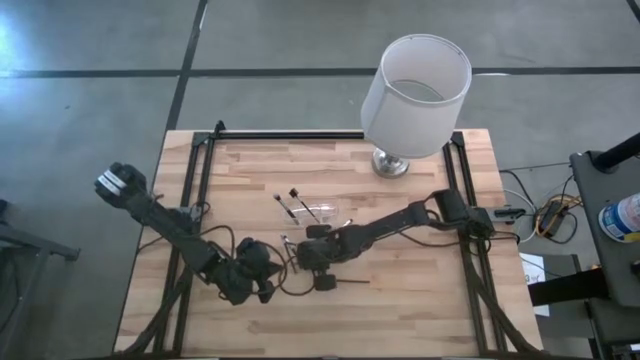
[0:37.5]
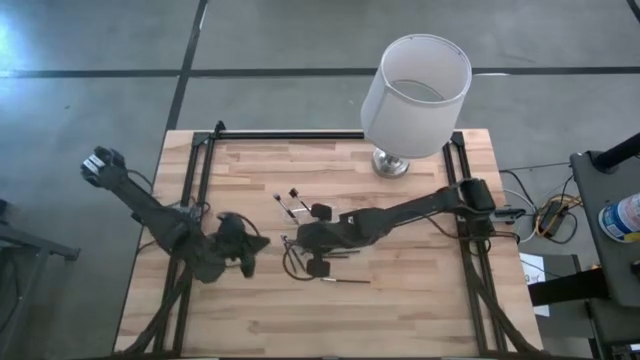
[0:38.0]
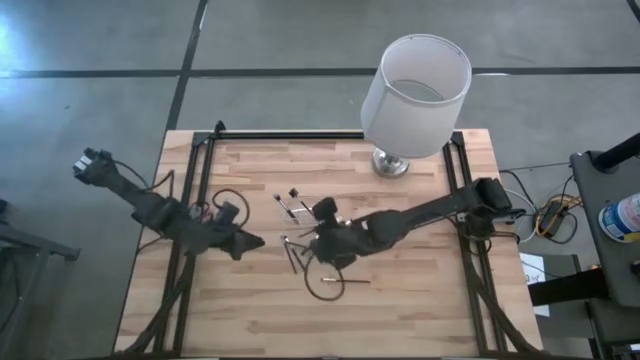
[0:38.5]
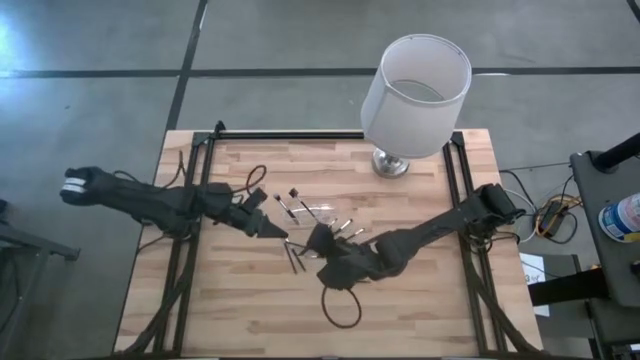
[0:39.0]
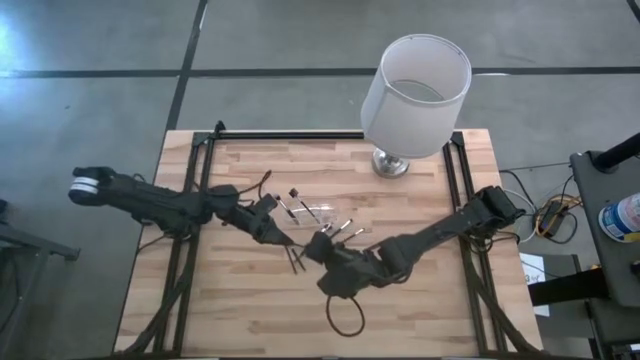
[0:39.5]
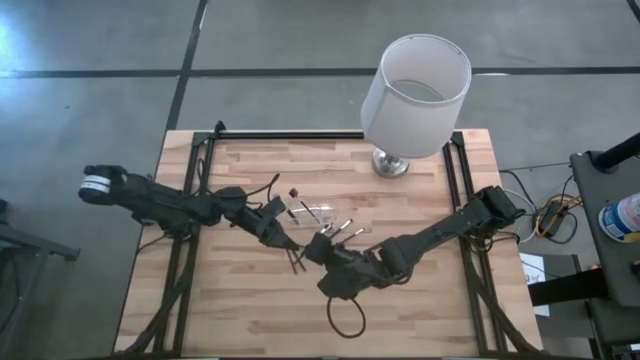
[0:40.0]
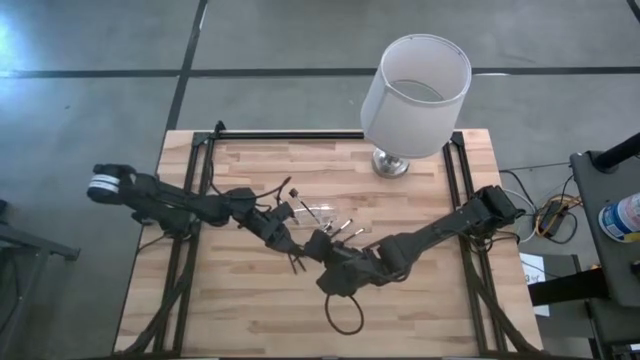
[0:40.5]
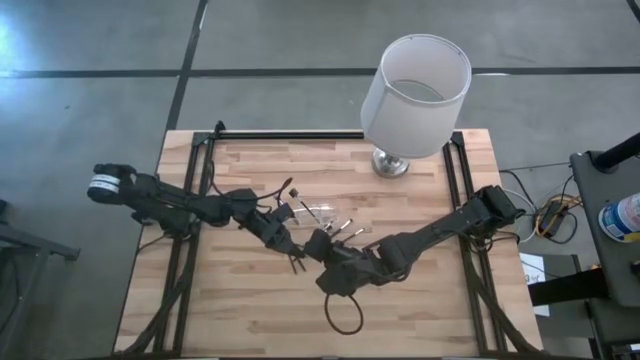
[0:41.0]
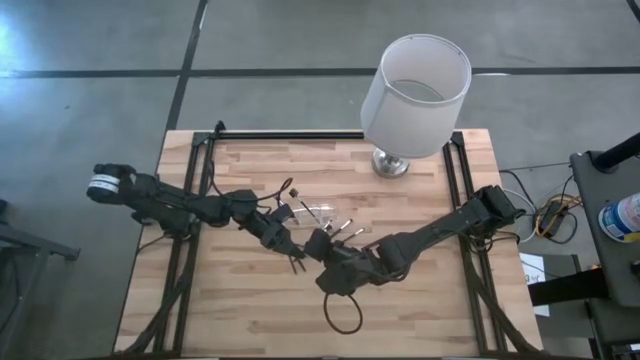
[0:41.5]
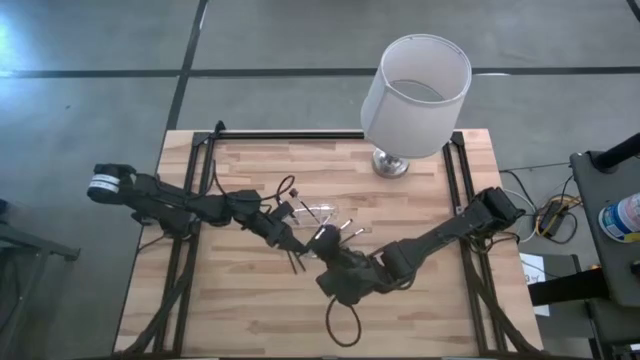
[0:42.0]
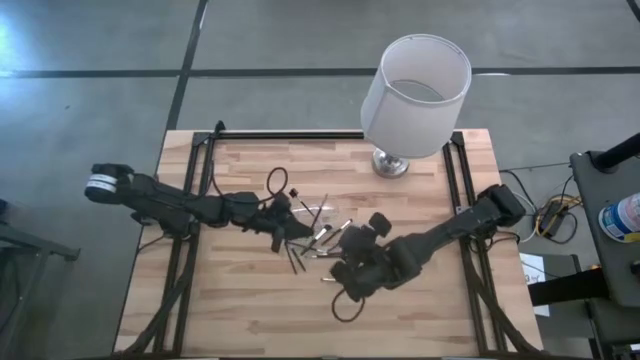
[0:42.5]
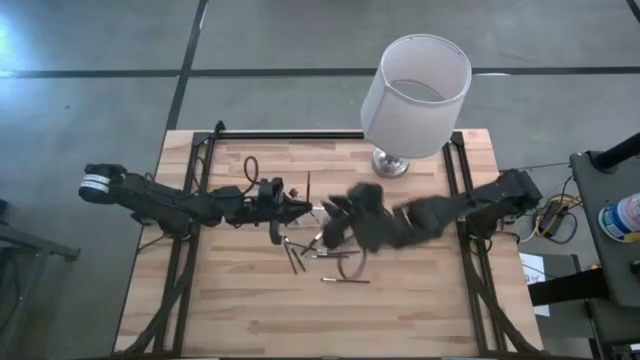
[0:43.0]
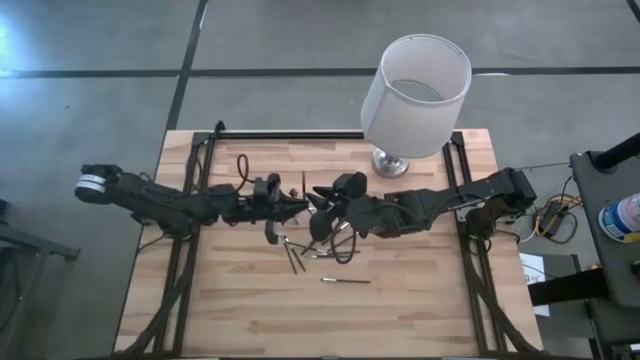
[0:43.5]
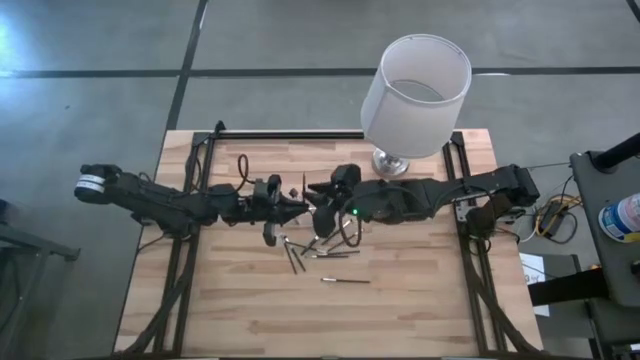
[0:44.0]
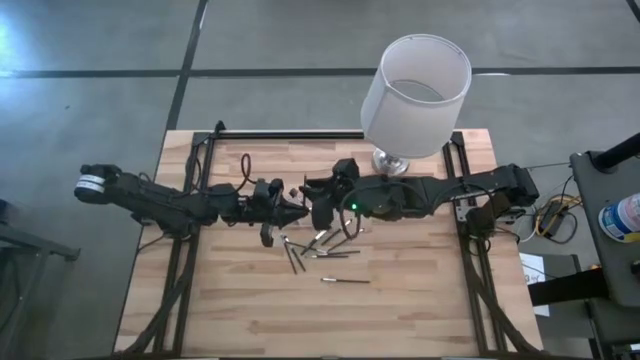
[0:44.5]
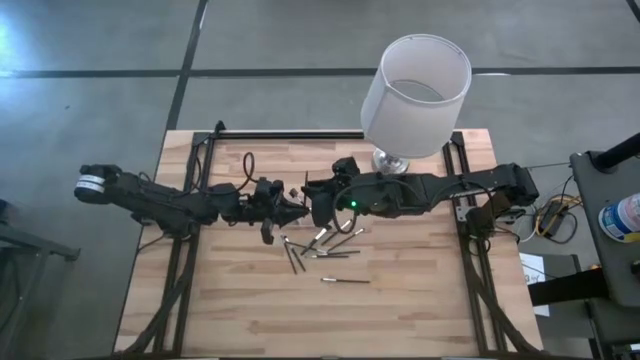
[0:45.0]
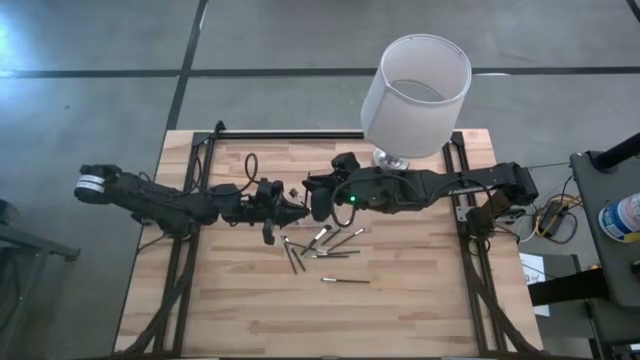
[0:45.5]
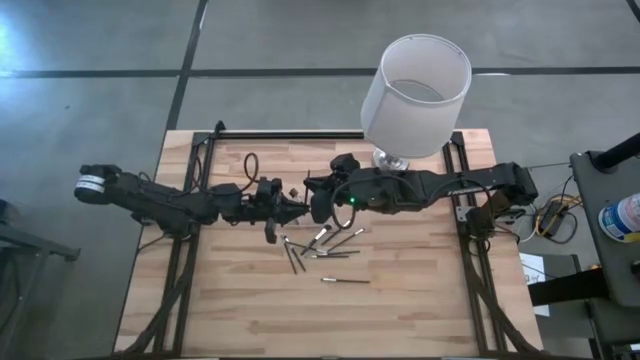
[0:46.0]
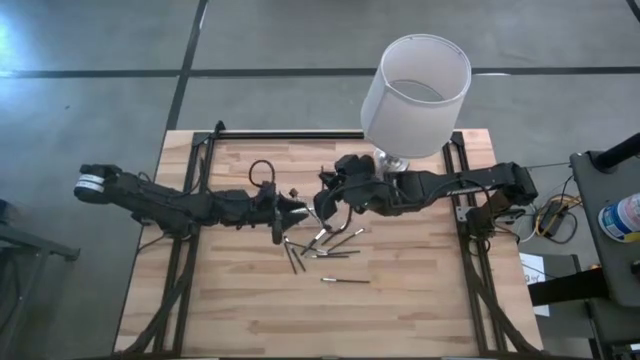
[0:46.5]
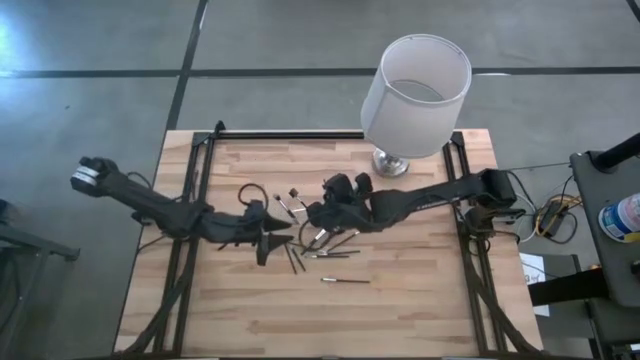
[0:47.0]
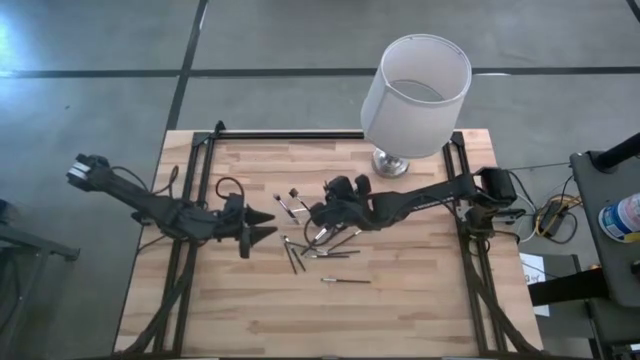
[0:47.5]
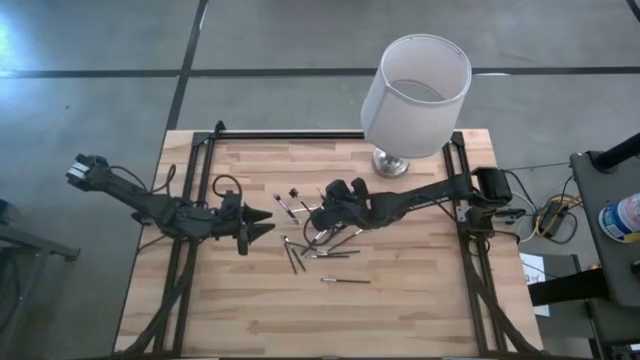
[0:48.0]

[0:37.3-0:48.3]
Task: Put items in baskets/containers
Put the eyeshadow brush into the transparent organizer

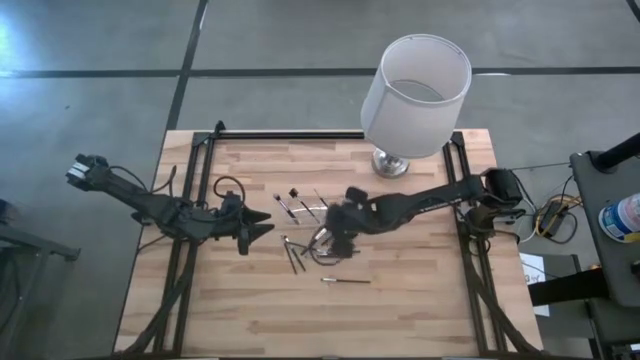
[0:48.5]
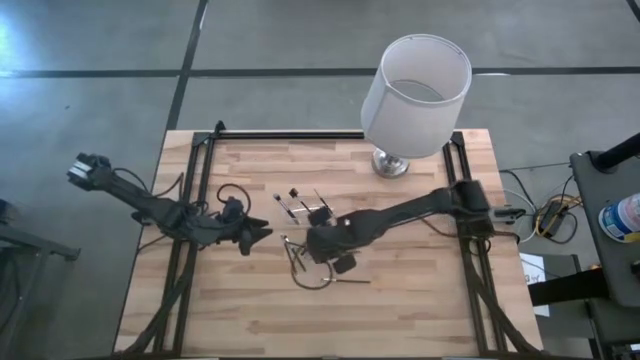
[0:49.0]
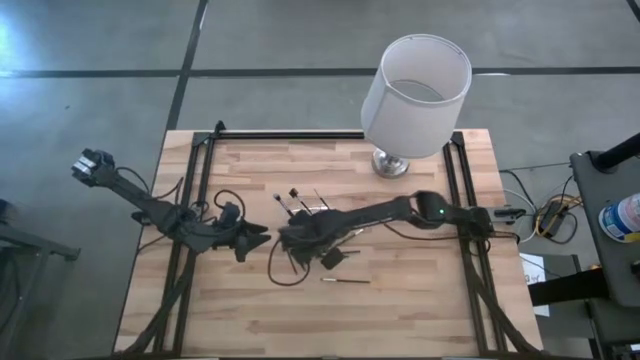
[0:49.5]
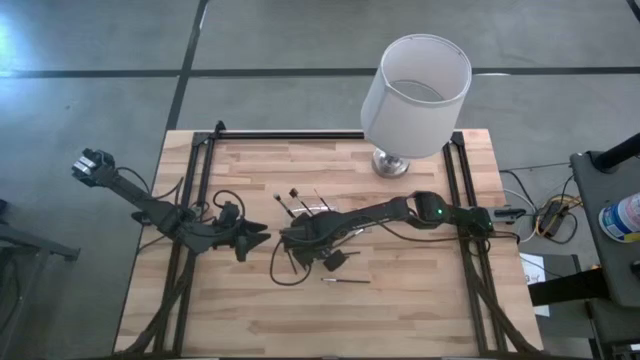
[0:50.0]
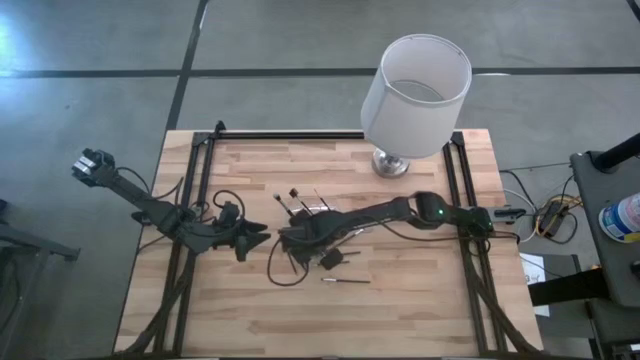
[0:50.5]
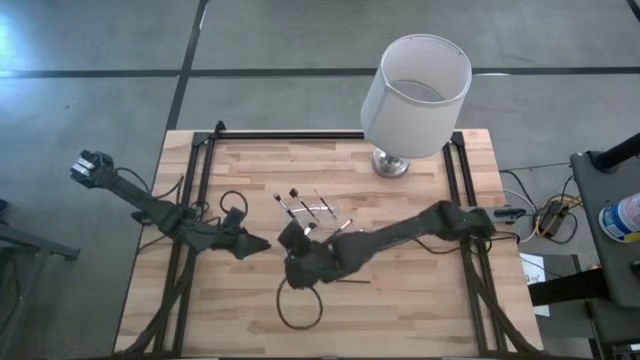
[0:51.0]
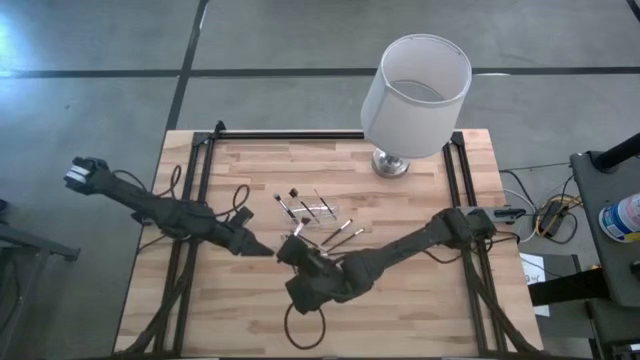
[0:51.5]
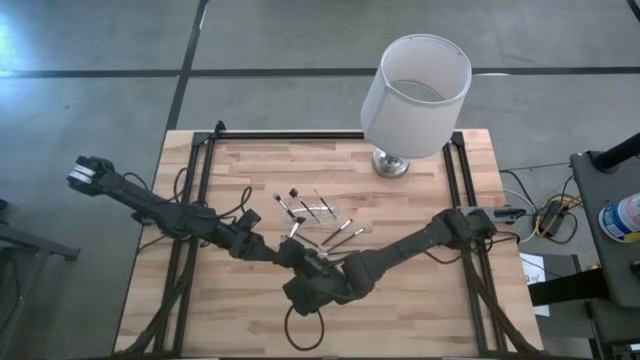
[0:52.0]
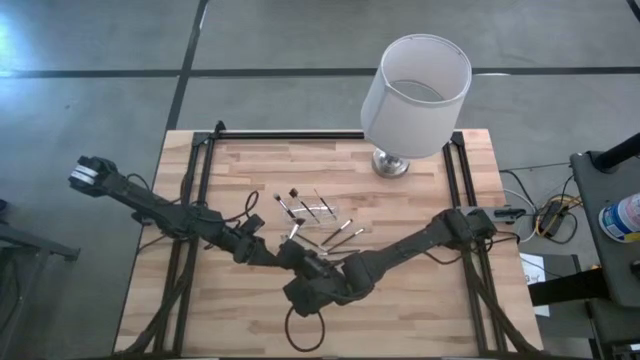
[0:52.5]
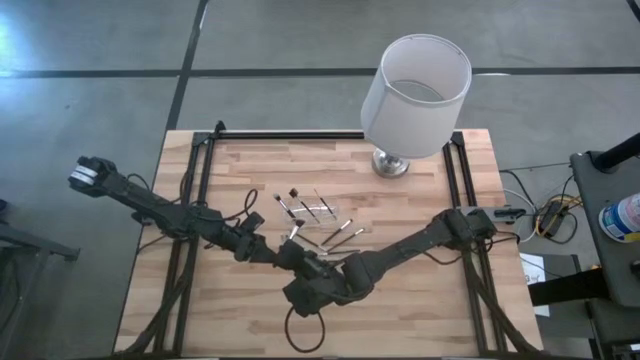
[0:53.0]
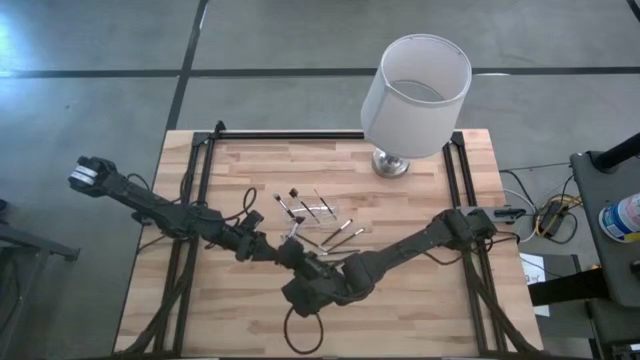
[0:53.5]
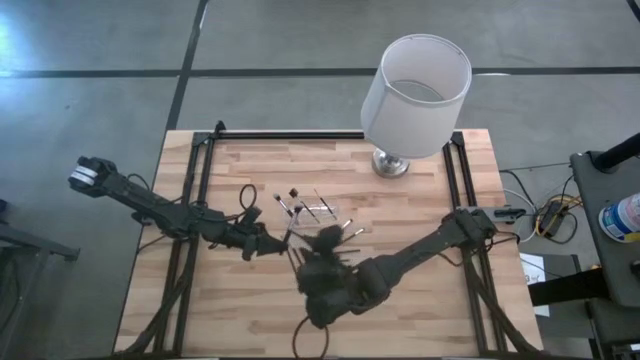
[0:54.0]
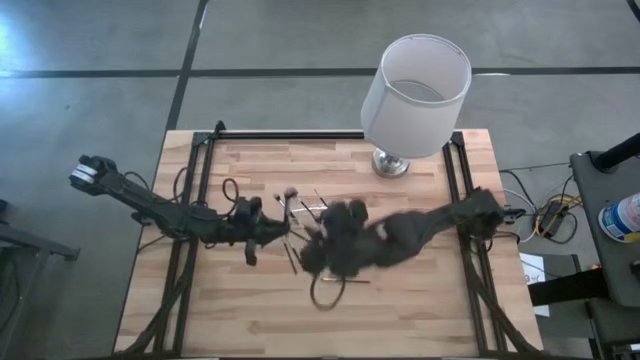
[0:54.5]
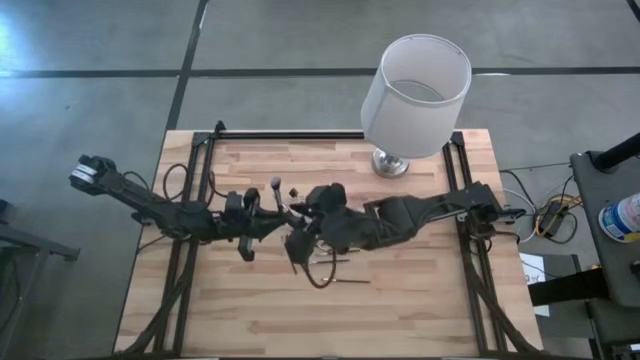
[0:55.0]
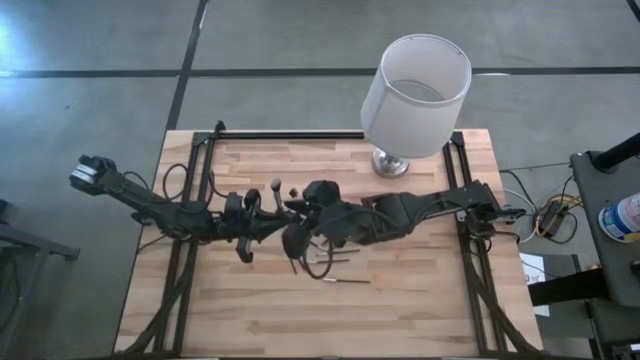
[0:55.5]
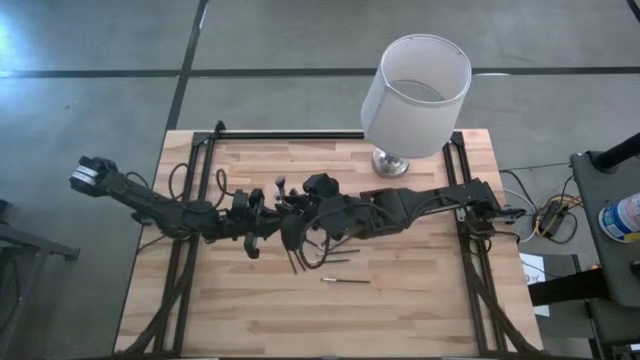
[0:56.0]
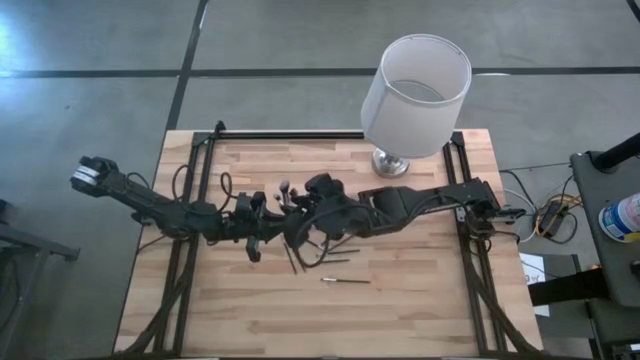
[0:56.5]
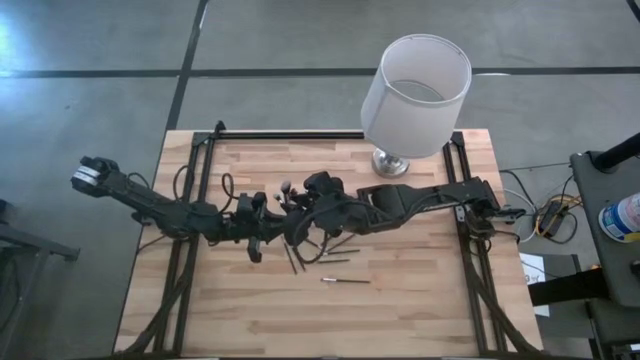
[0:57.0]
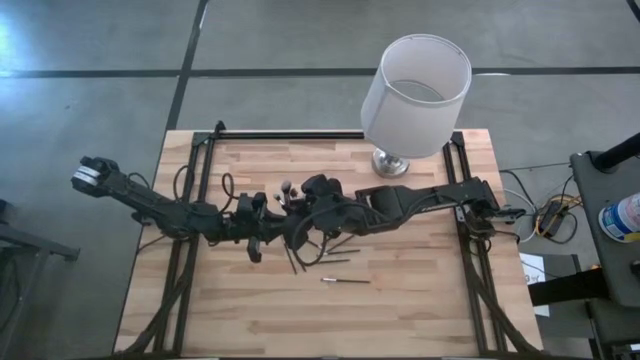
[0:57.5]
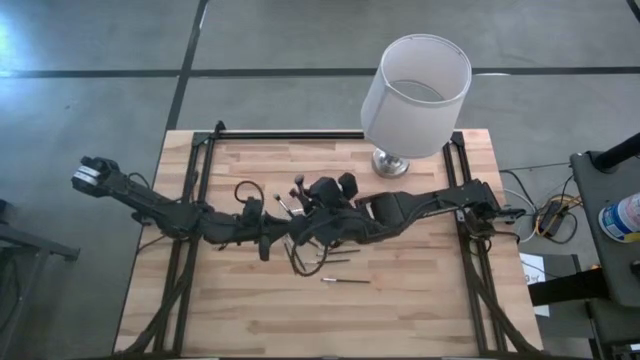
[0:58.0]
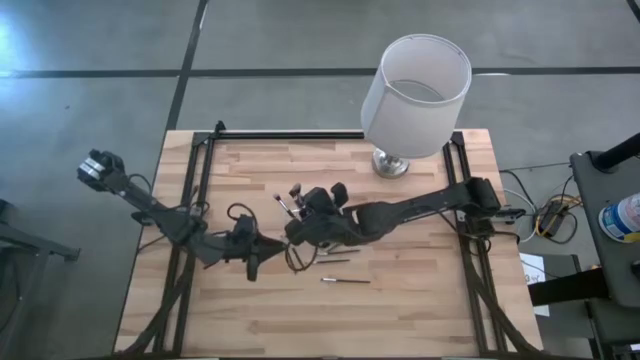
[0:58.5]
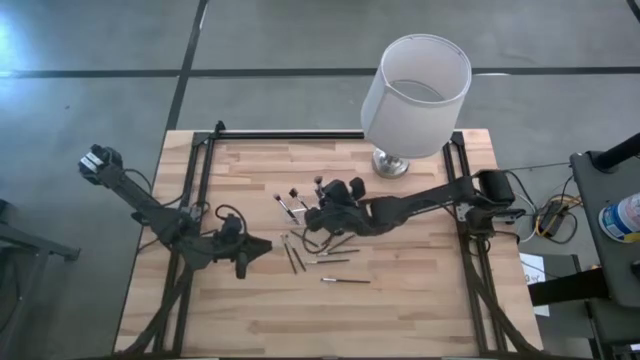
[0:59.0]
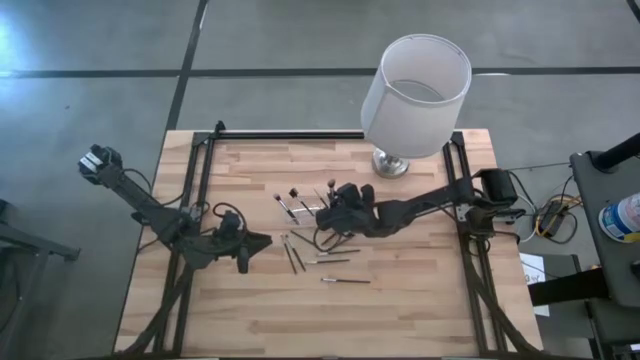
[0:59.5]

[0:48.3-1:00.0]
Put the foundation brush into the transparent organizer
